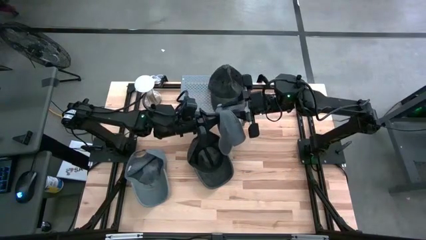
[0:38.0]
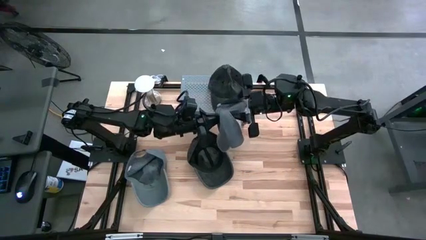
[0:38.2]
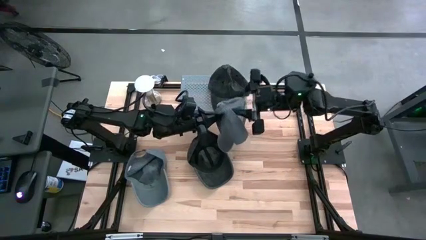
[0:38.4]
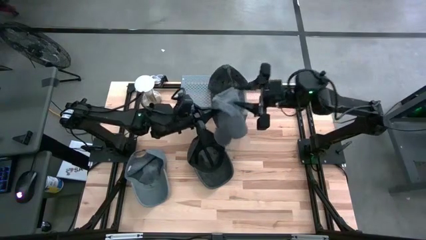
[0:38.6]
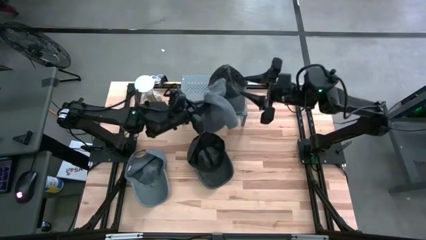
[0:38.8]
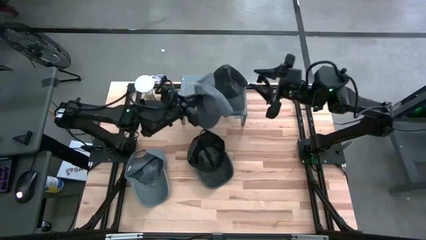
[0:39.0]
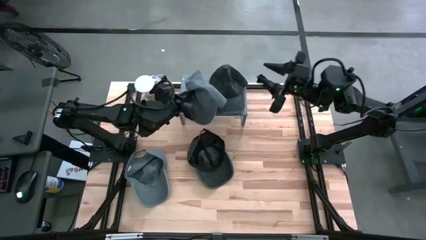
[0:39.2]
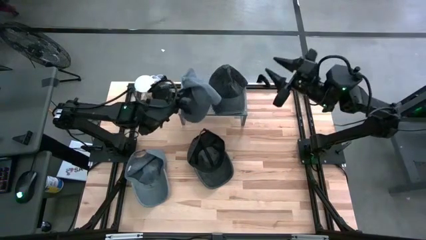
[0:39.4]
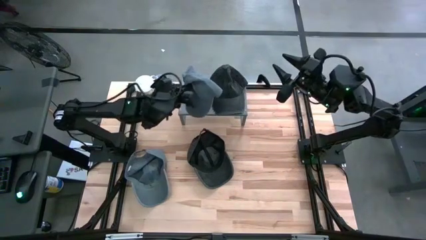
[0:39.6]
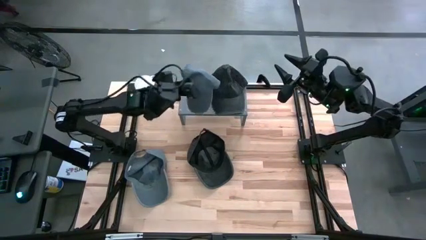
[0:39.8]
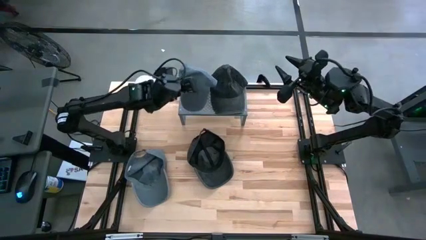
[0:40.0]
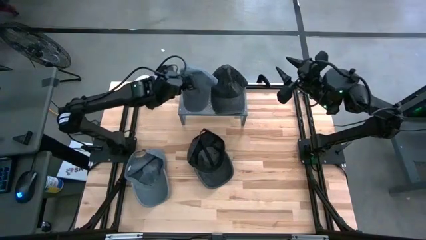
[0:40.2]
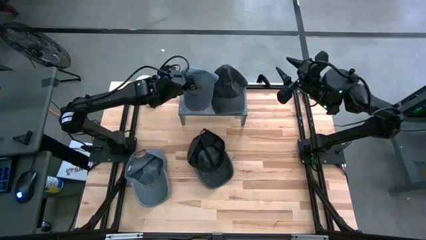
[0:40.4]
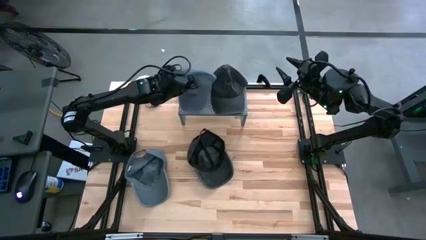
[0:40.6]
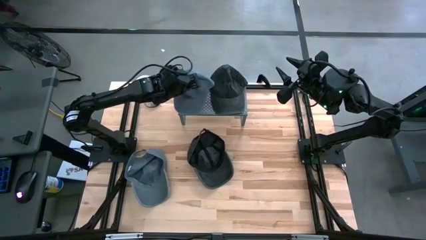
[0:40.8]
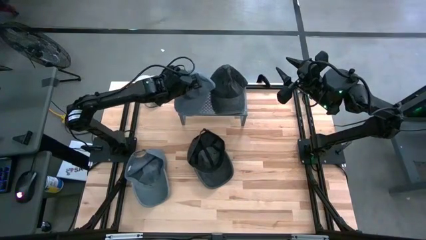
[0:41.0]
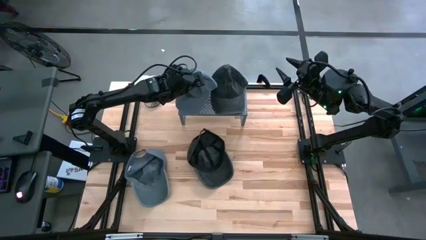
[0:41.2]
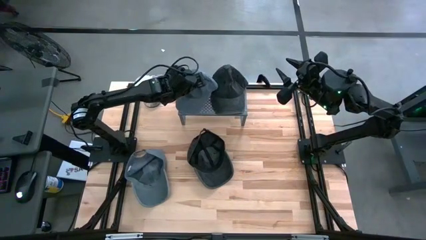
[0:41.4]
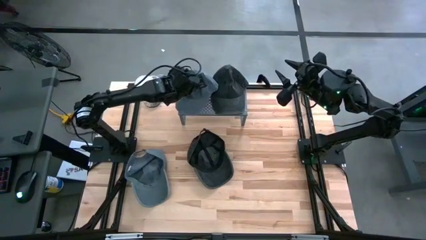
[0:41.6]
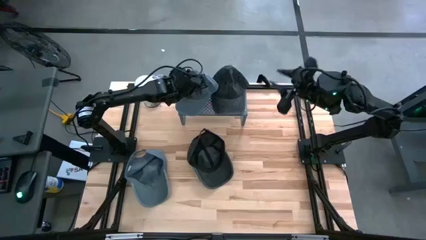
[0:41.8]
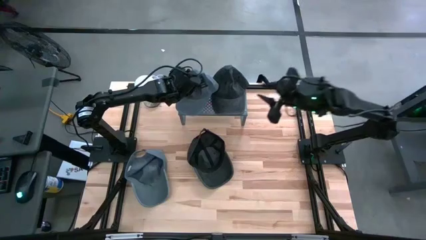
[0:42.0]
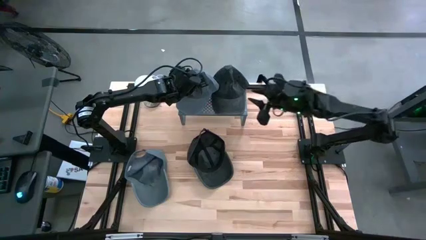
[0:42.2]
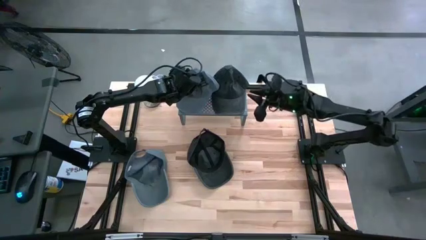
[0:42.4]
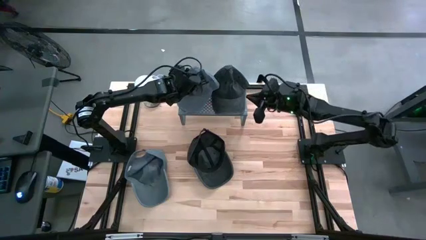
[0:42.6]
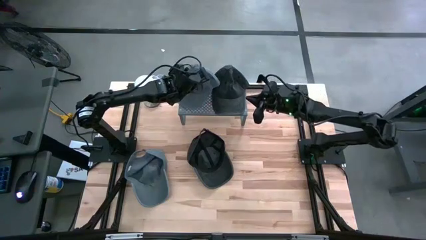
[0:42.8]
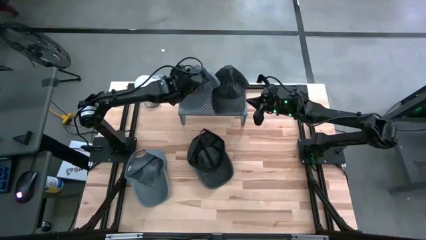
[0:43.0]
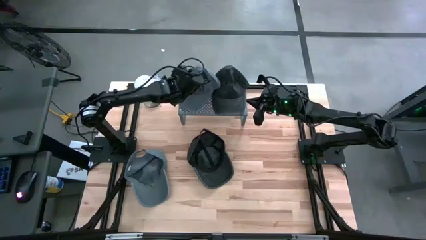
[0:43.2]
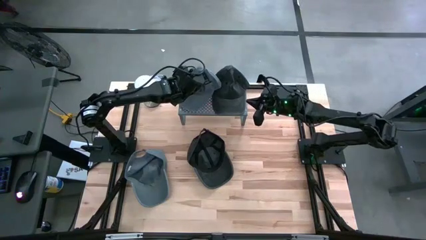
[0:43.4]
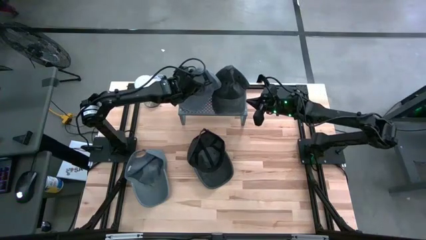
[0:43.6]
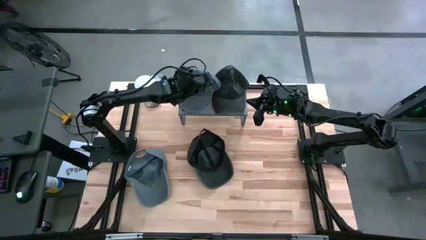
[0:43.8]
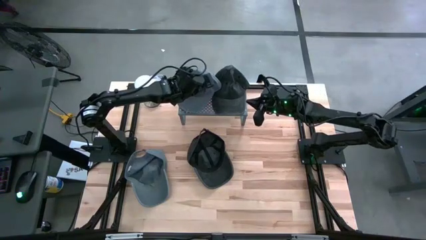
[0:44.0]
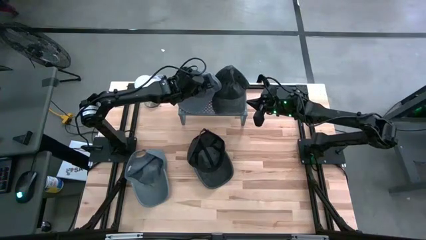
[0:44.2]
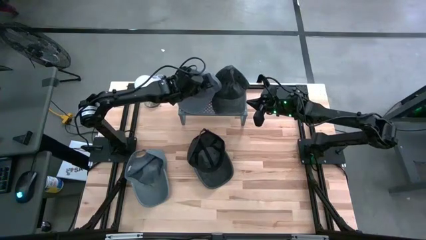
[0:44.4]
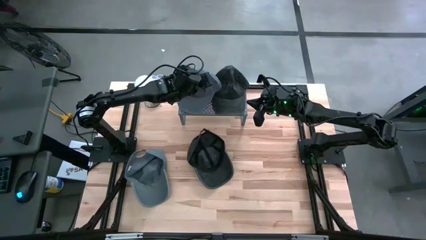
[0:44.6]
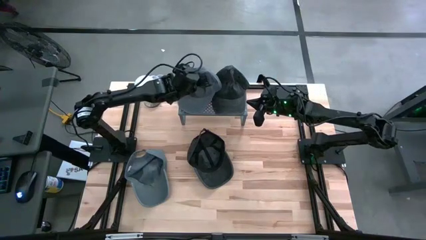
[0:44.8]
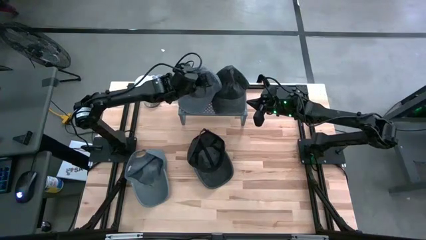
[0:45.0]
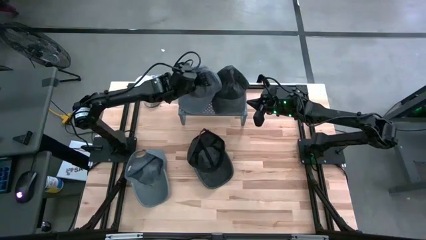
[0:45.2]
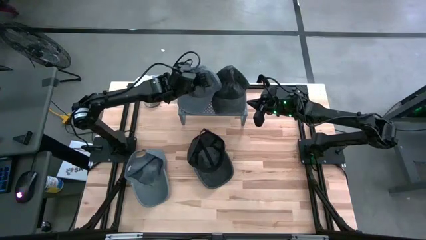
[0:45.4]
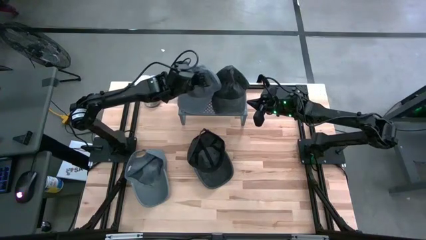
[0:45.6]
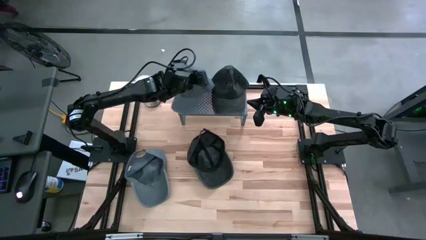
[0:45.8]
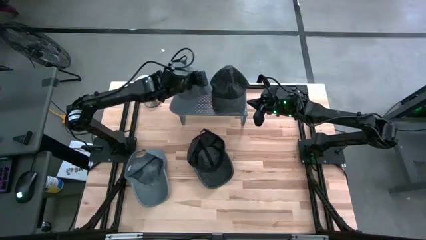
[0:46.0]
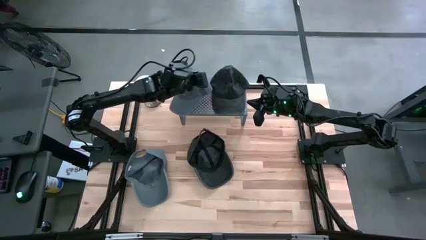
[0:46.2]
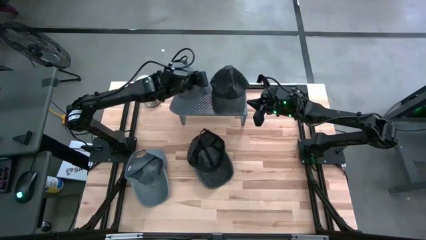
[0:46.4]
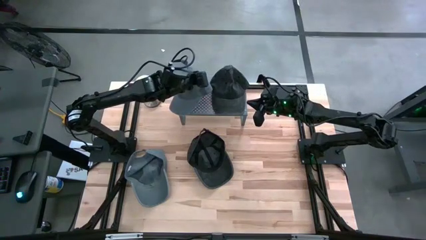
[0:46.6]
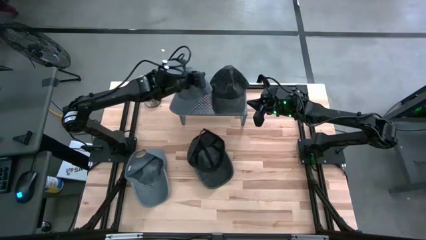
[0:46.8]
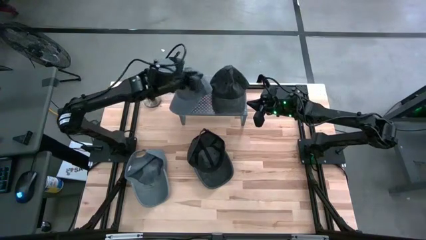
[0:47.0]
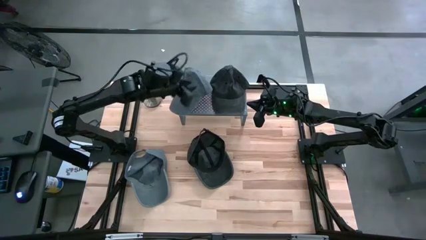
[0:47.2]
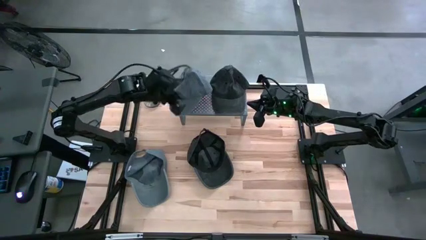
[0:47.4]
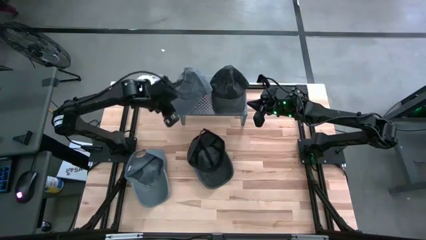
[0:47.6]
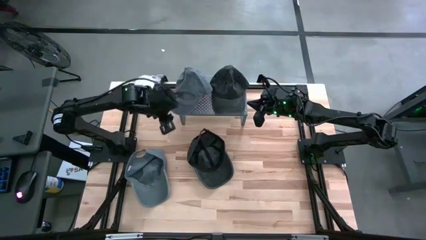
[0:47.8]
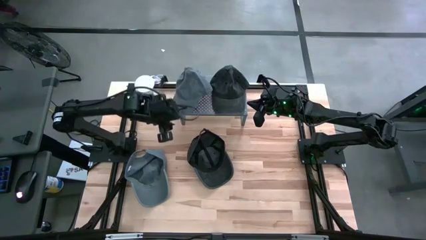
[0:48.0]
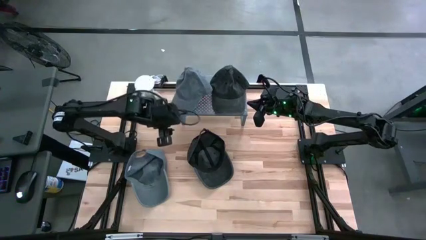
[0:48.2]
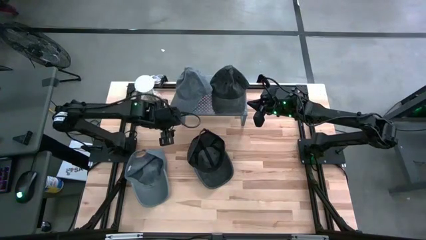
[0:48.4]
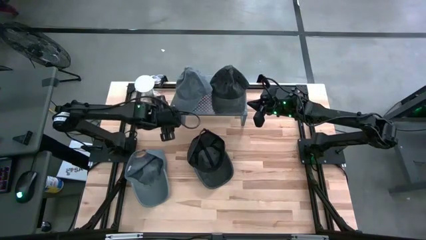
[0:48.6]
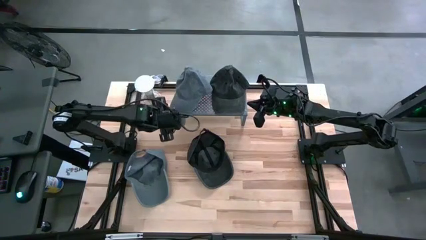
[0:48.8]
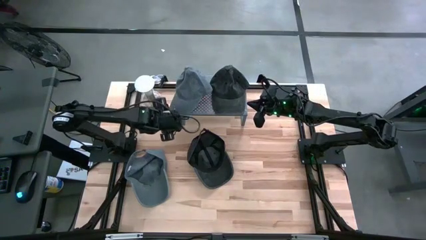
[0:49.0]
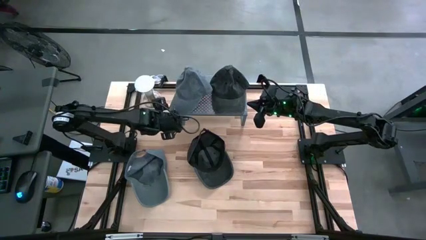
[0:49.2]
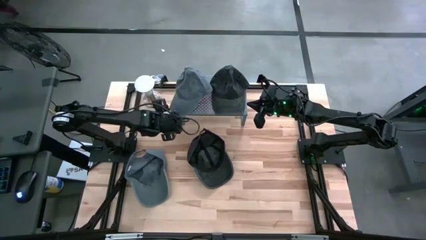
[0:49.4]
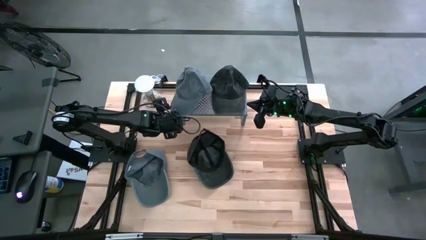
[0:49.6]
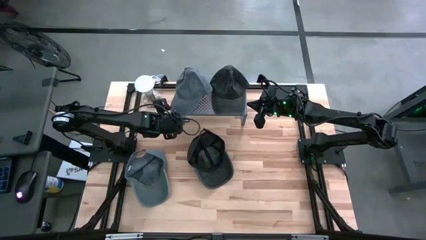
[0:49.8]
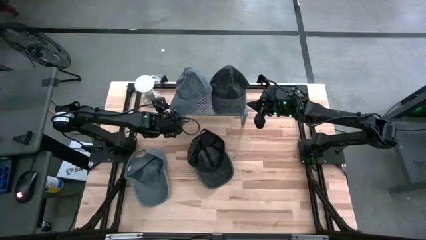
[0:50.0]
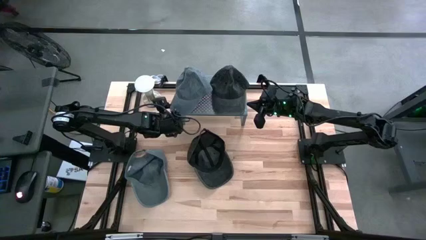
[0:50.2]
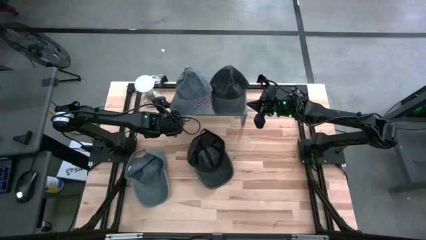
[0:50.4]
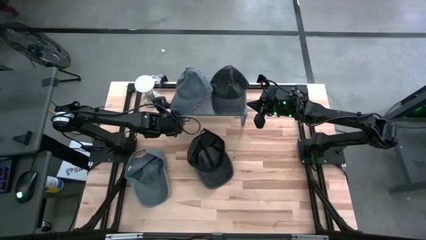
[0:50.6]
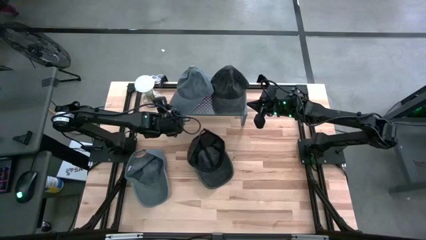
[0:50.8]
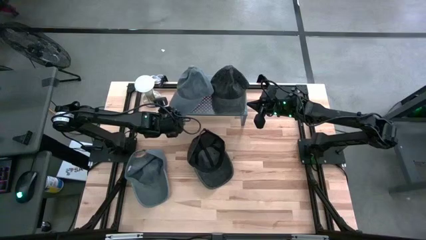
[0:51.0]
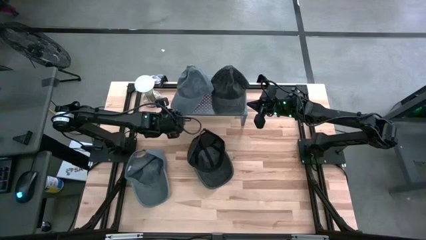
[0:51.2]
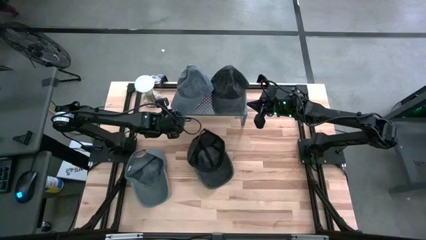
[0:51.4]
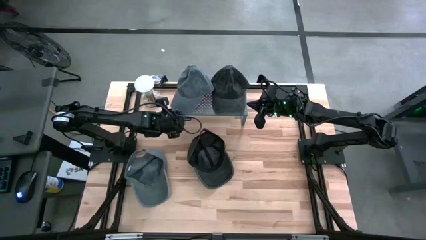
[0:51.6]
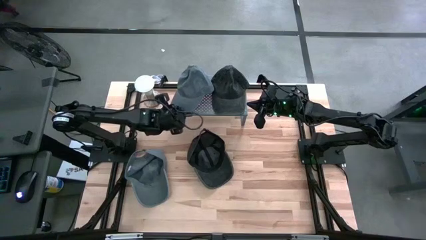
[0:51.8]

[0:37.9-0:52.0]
Task: Pick & Place hat
Put the right gray cap on the shelf
